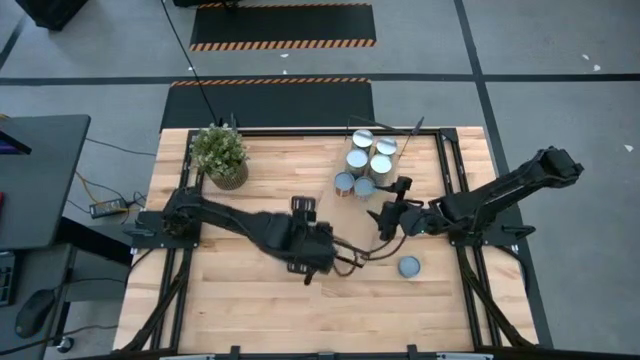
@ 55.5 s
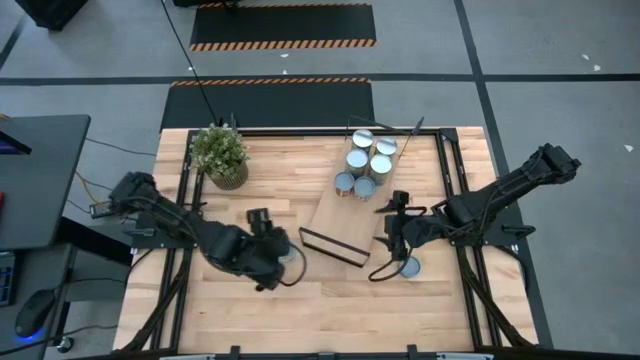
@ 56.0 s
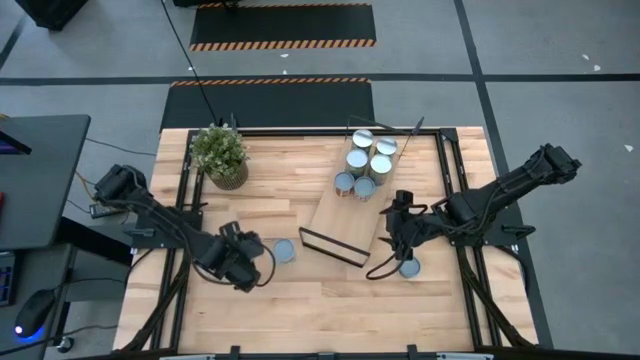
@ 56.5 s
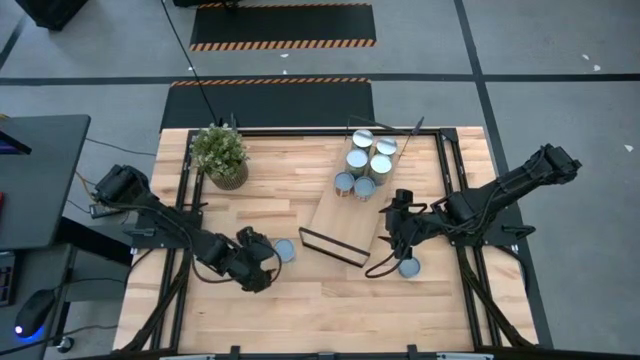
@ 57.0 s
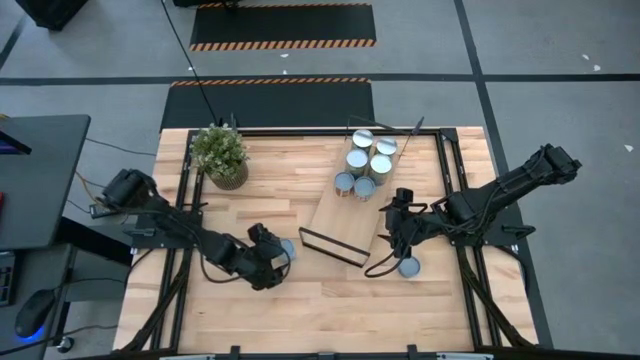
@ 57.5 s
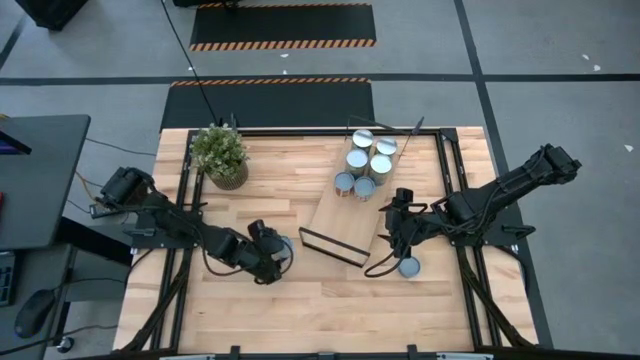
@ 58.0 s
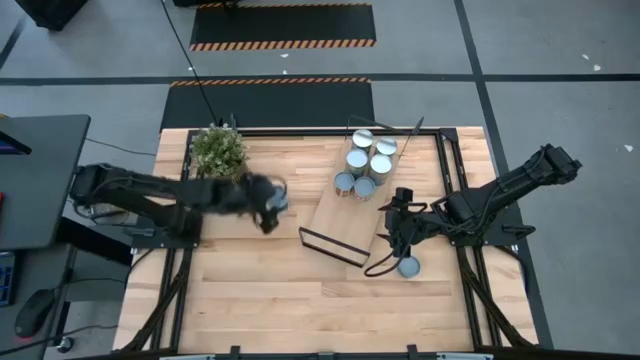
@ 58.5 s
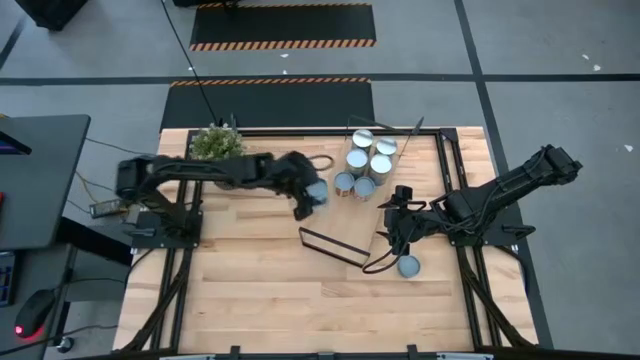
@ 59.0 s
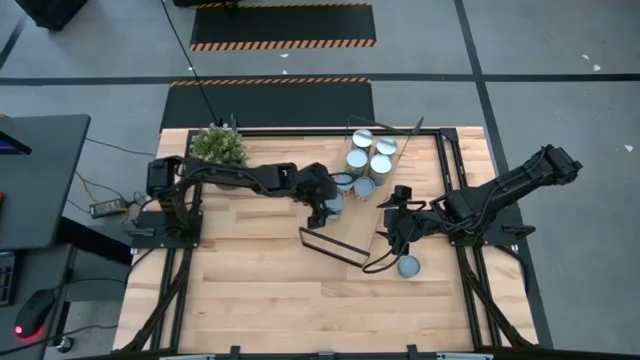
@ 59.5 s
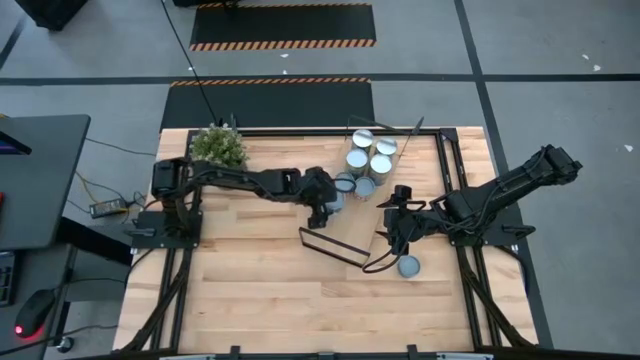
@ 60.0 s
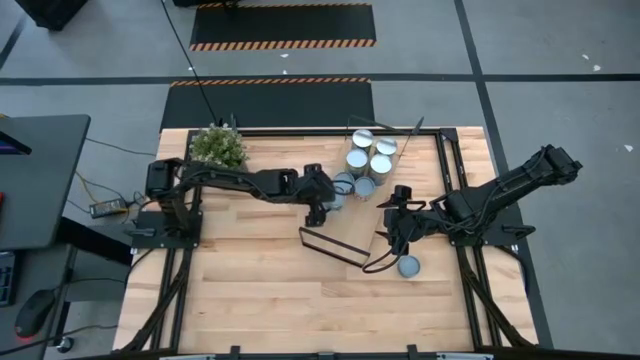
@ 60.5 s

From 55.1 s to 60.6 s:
Task: Pick and place cans onto a shelf
Put the mixed vegetables can on the shelf

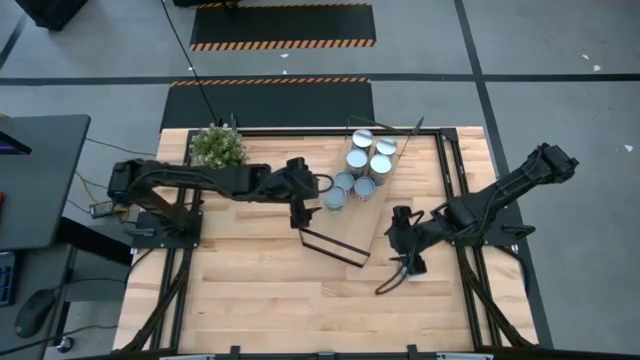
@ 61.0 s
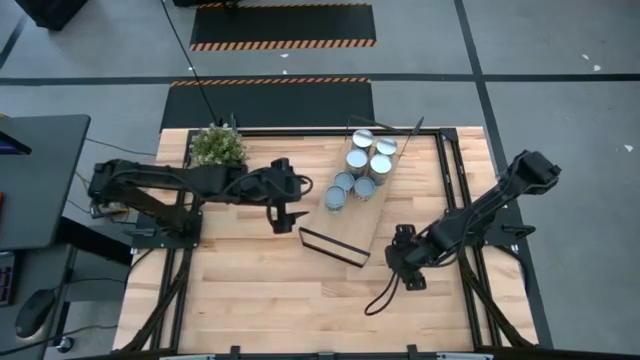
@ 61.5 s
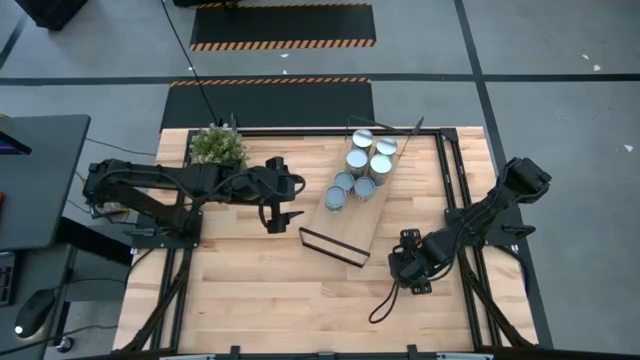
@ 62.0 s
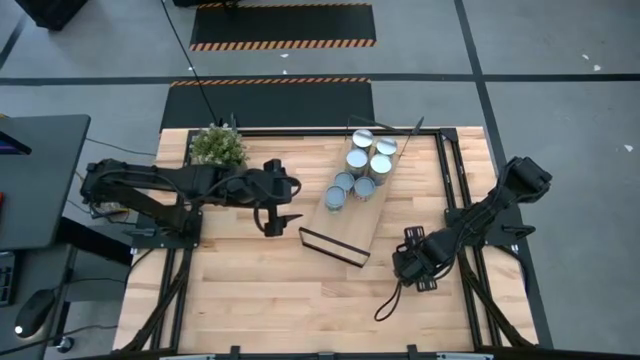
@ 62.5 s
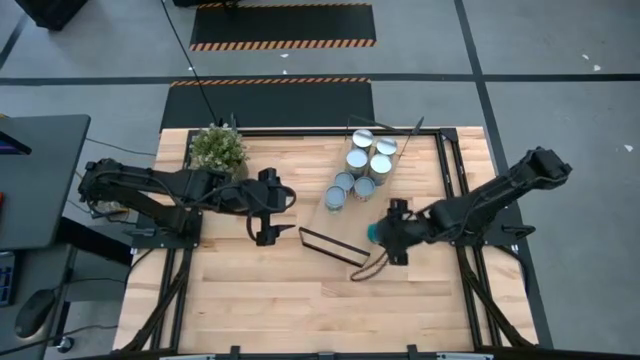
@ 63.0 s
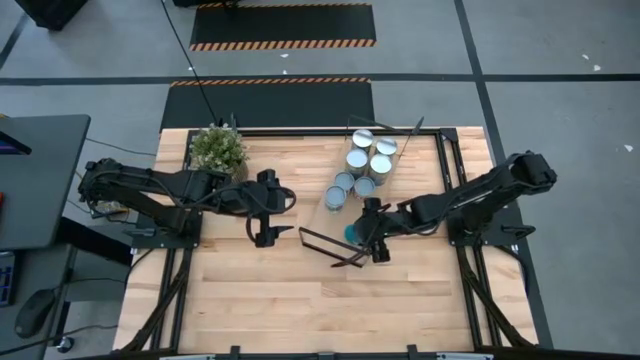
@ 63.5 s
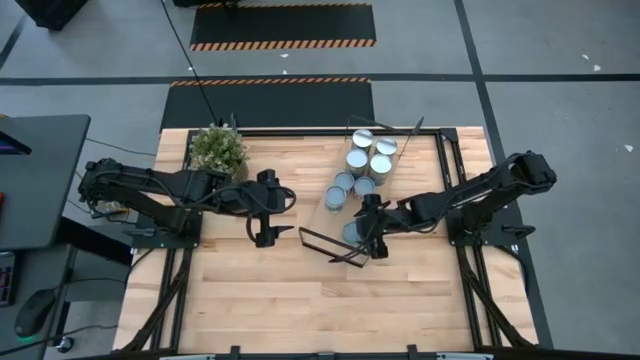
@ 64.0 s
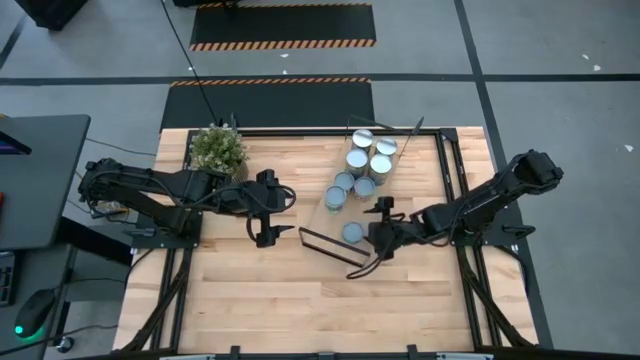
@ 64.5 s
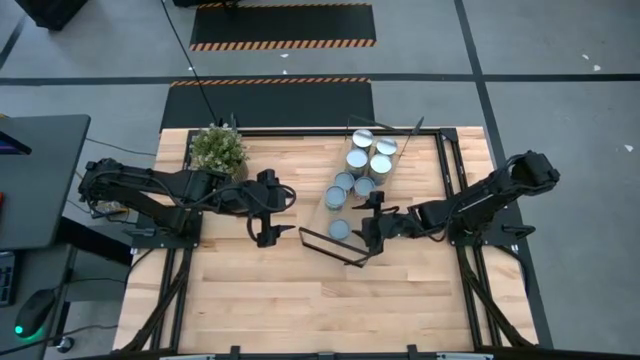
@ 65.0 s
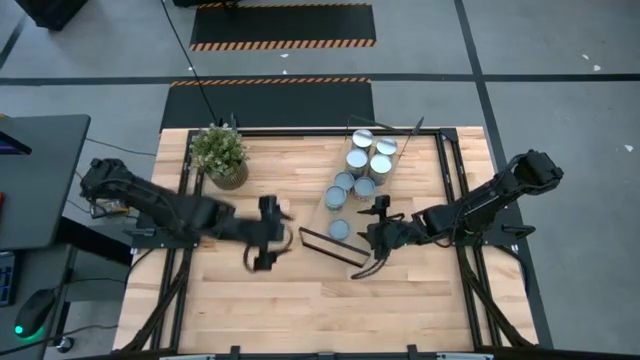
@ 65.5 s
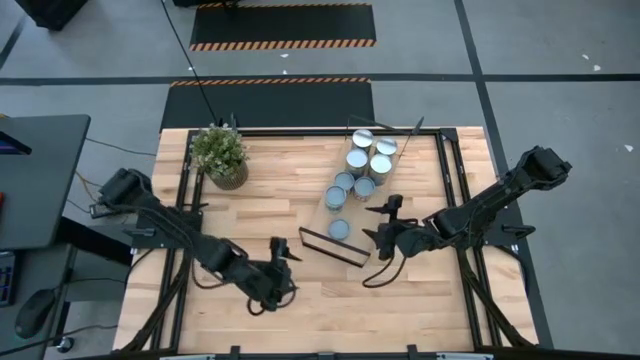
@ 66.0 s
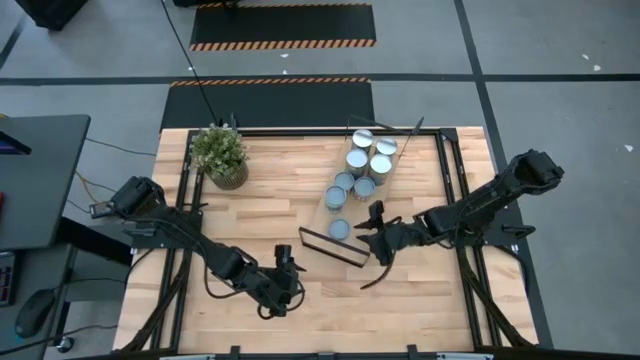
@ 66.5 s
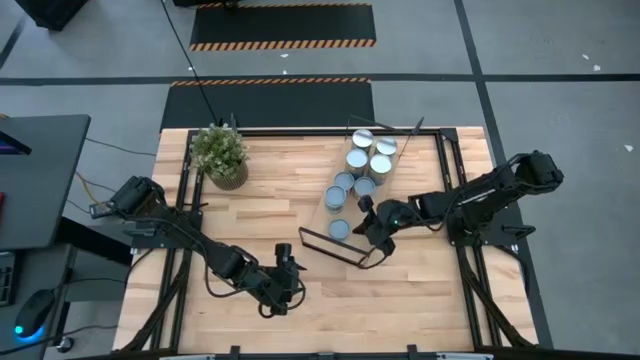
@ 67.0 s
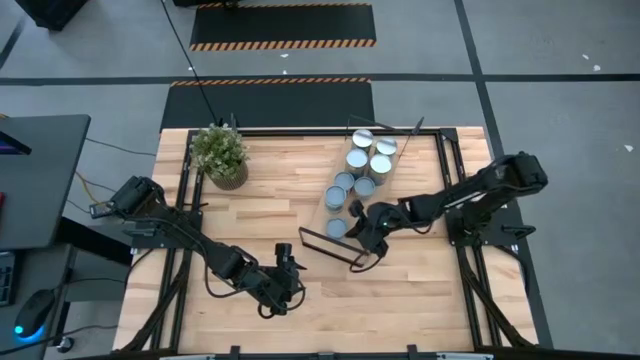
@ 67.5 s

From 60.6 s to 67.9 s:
Put the canned tuna on the shelf

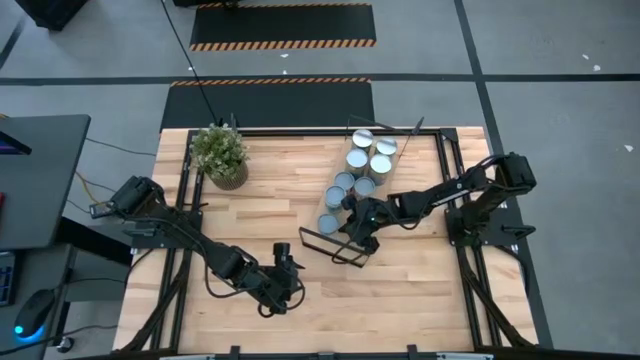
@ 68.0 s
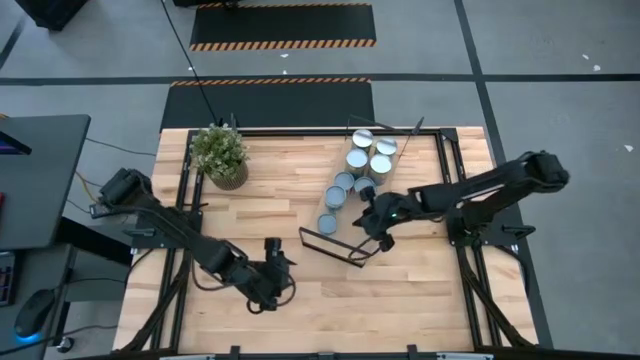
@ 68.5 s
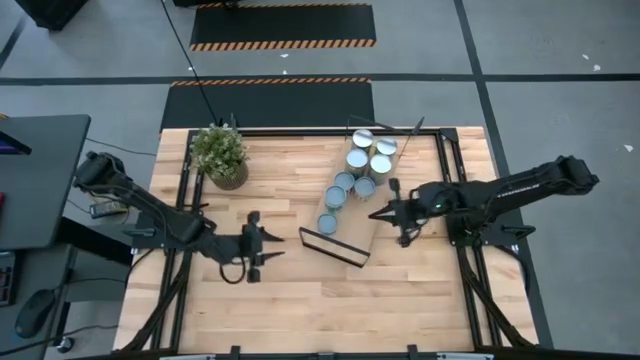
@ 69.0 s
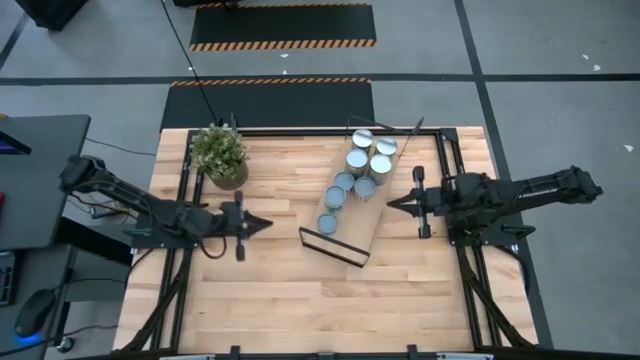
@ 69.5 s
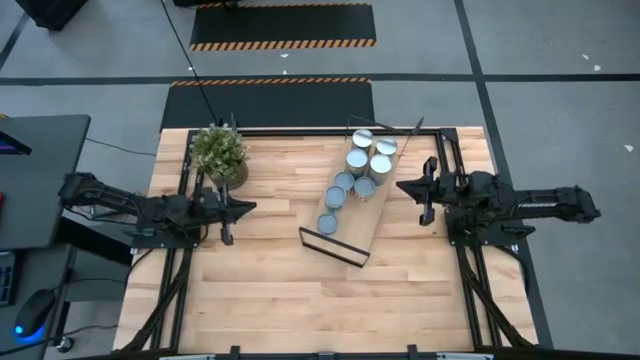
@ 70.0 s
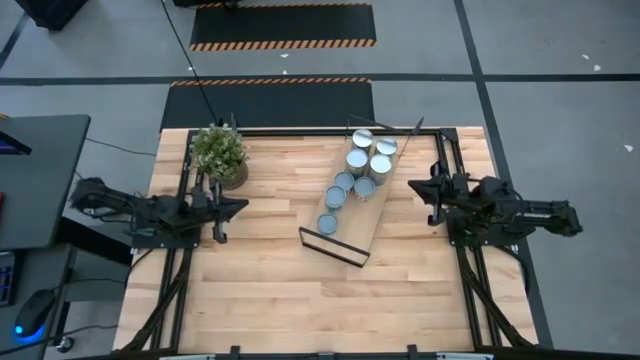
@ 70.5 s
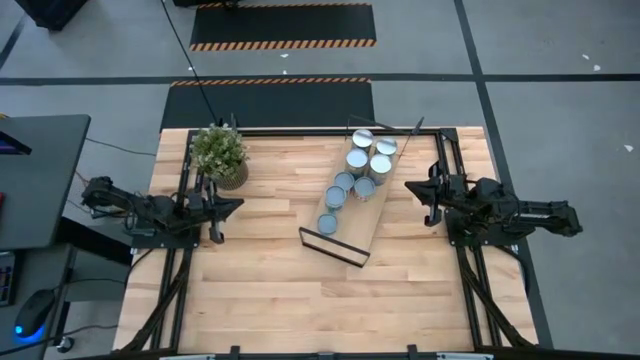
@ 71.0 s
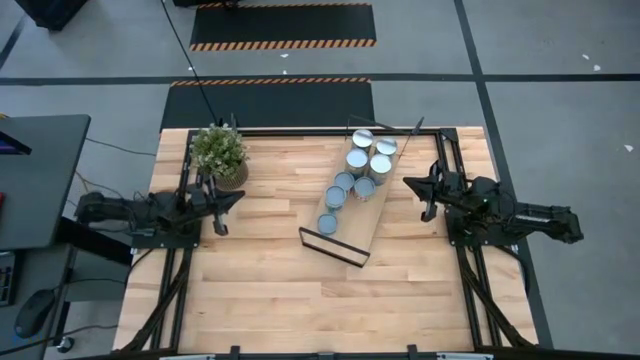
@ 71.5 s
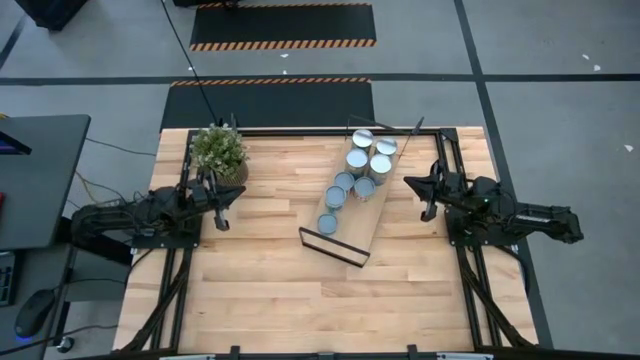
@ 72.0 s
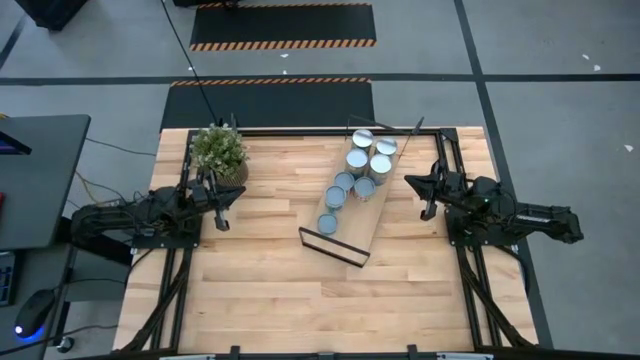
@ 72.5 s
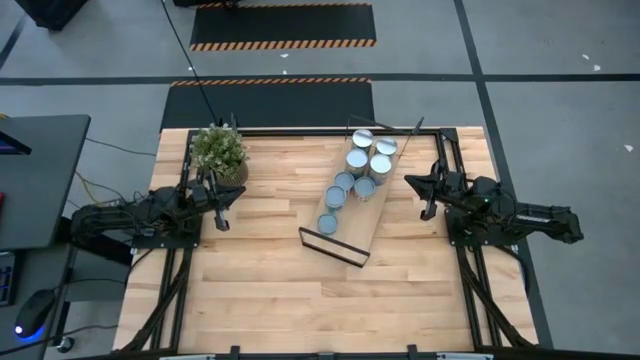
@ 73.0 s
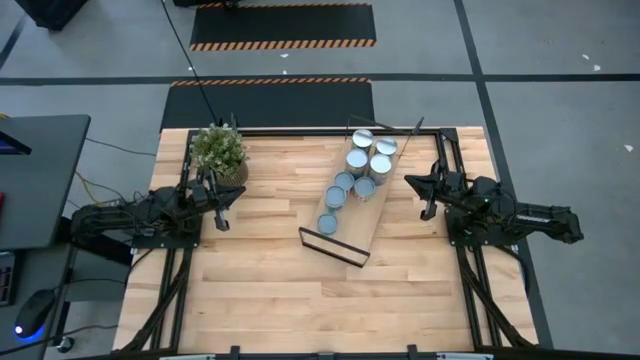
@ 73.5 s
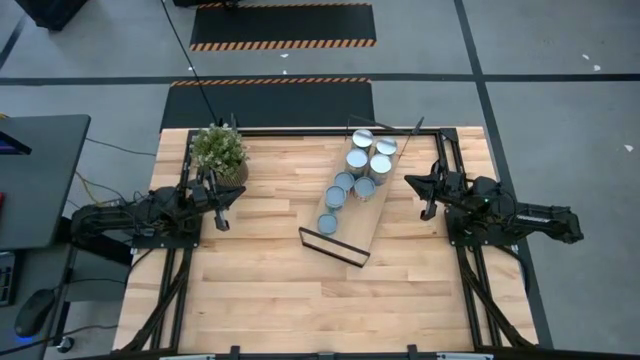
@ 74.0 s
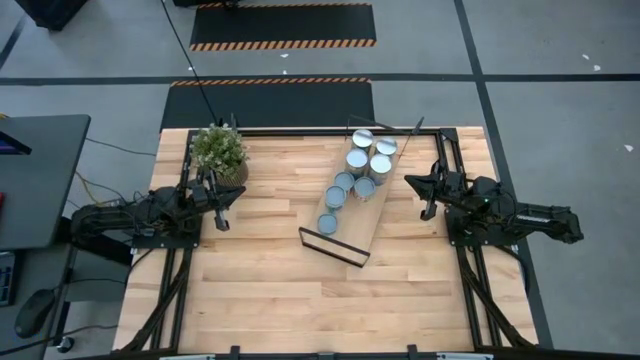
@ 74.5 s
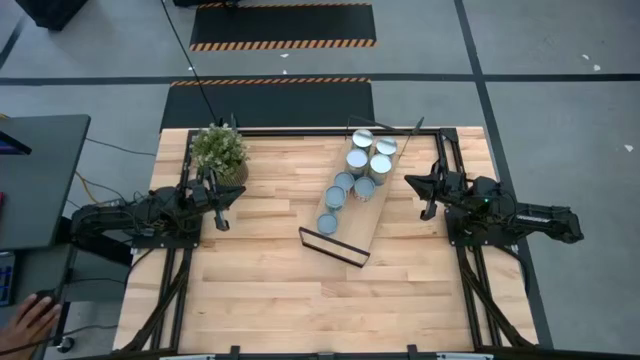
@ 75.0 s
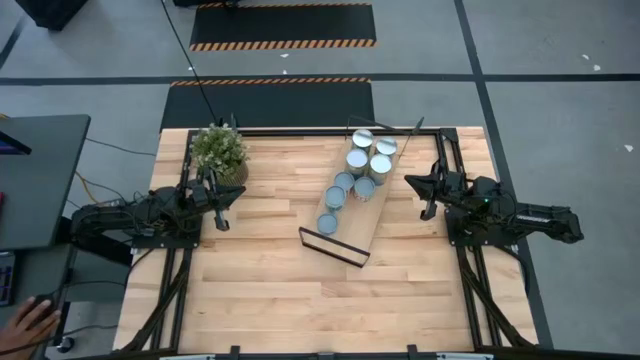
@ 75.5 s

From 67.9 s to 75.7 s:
Return to Home Position

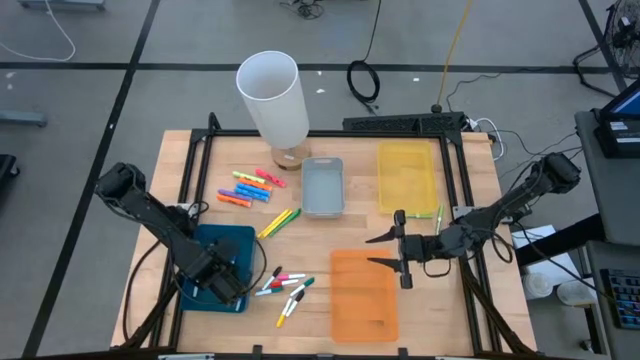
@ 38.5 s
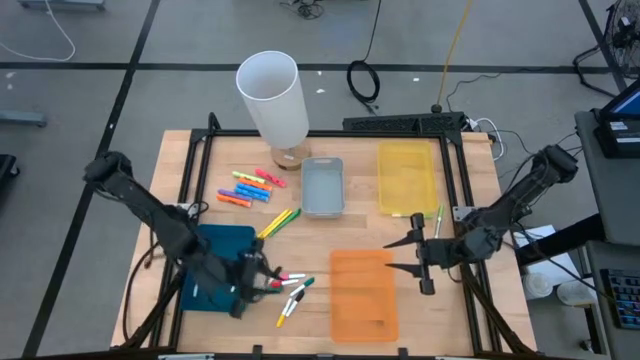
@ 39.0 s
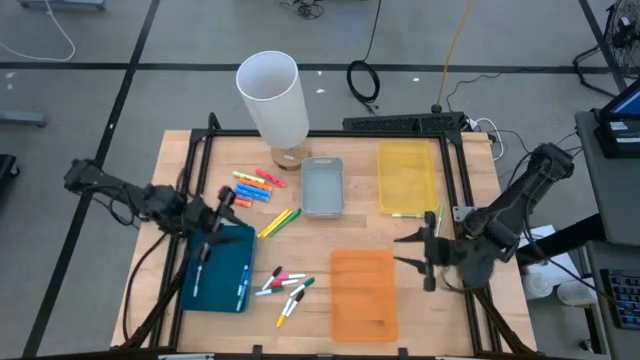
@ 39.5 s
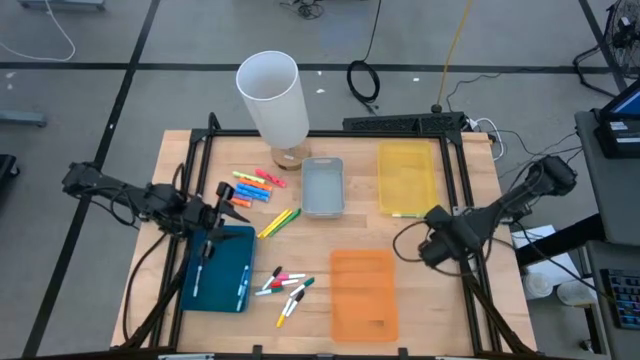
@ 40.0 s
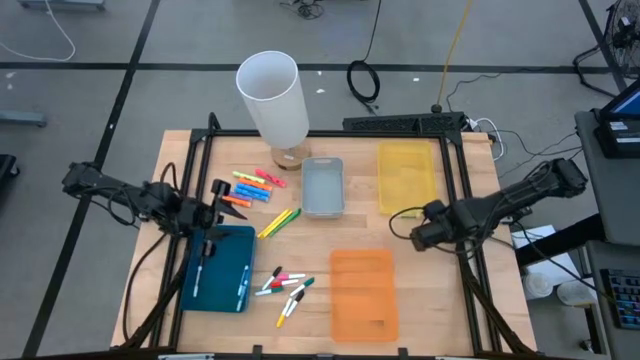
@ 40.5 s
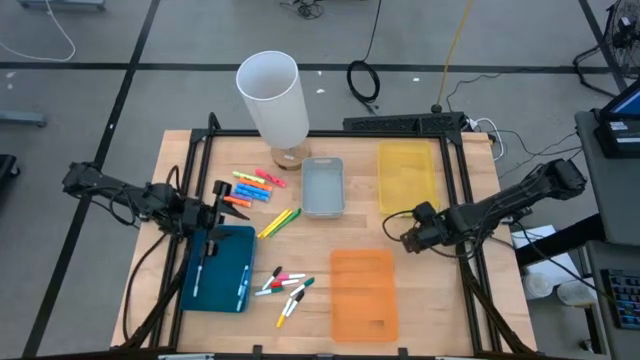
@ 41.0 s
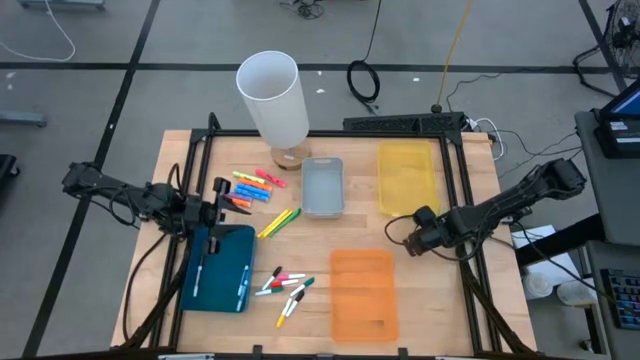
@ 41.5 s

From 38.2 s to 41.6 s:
Task: Pick & Place Markers
Put the right green marker pen into the blue bin
